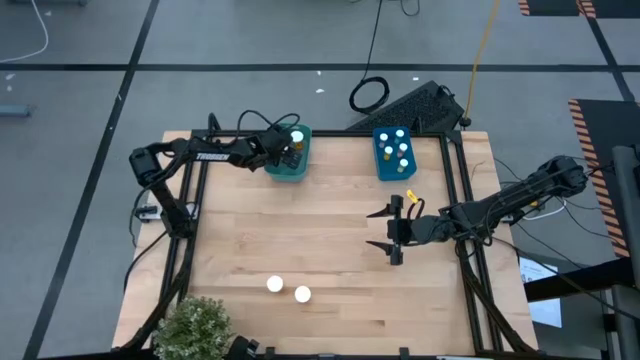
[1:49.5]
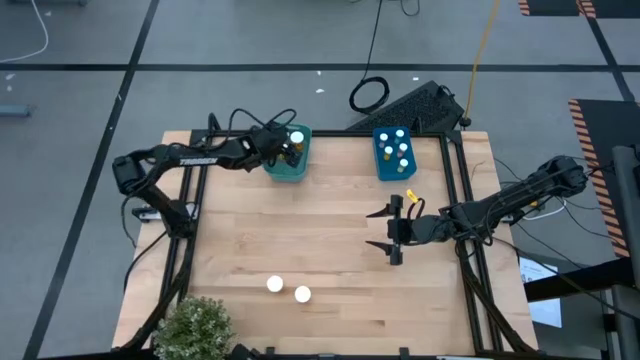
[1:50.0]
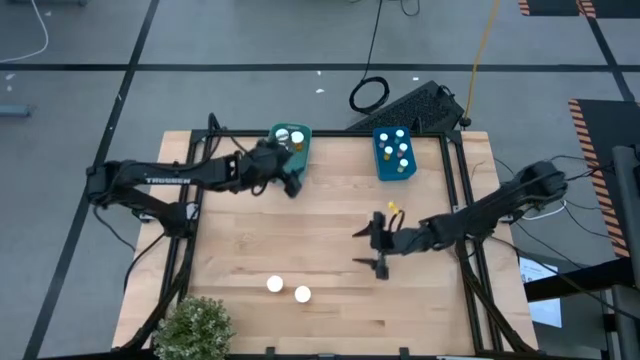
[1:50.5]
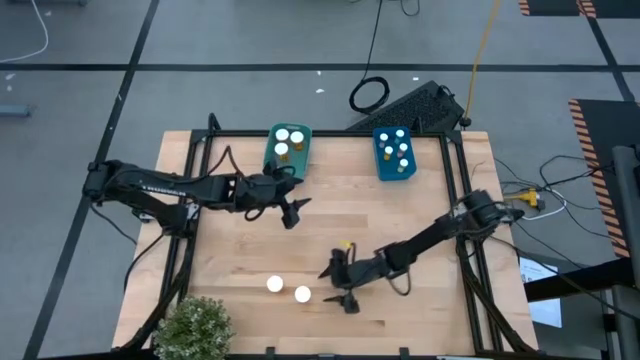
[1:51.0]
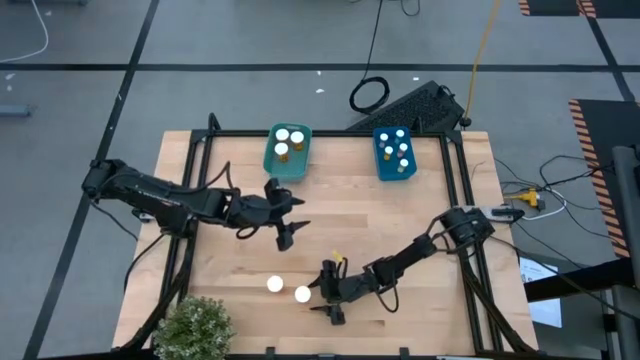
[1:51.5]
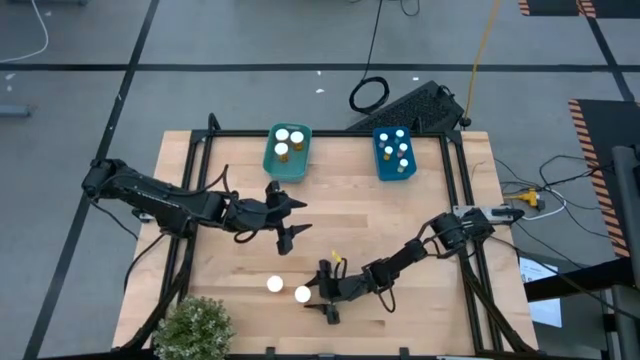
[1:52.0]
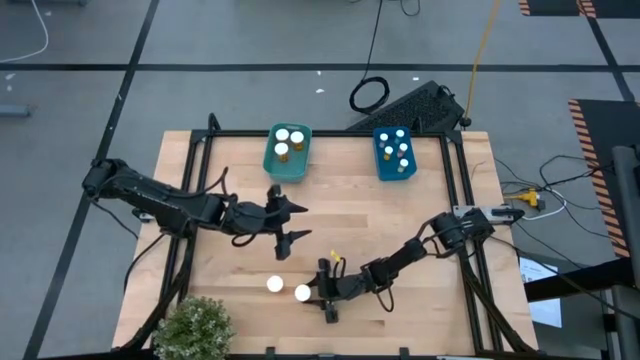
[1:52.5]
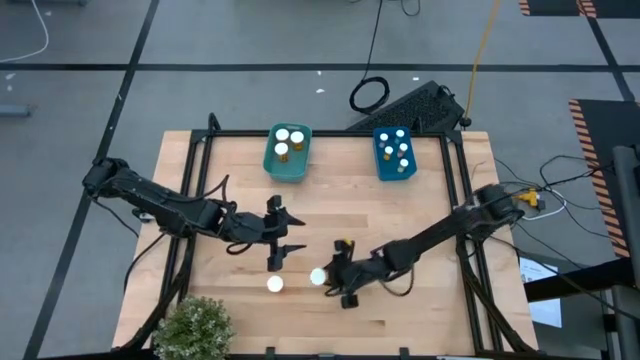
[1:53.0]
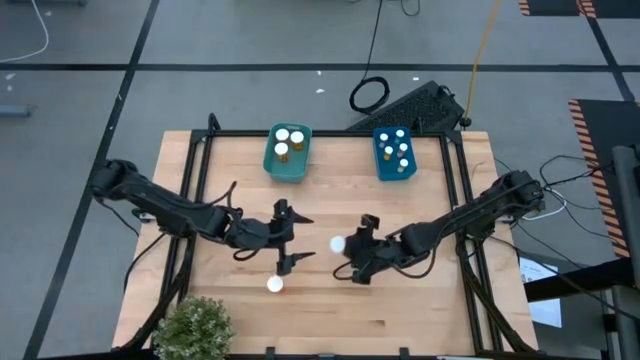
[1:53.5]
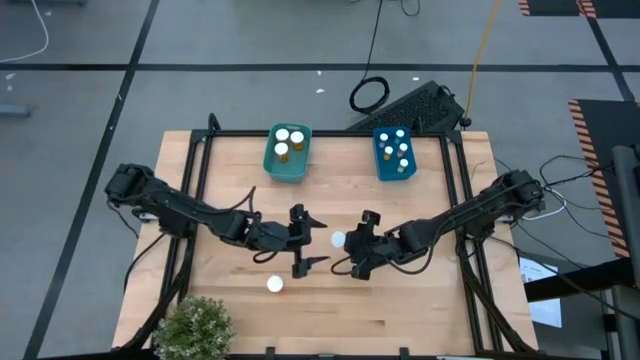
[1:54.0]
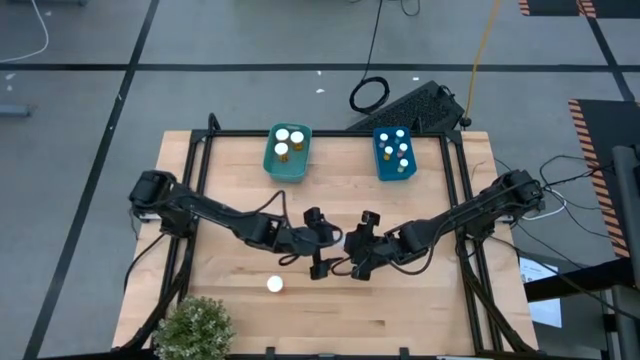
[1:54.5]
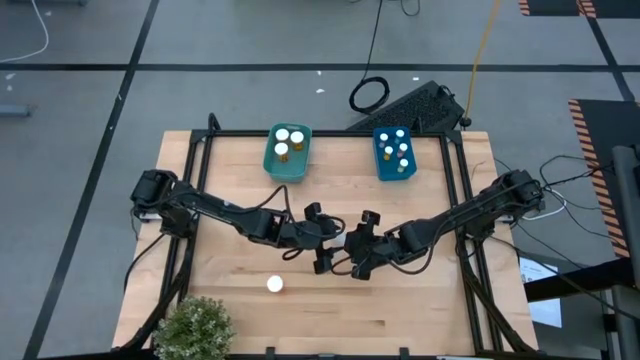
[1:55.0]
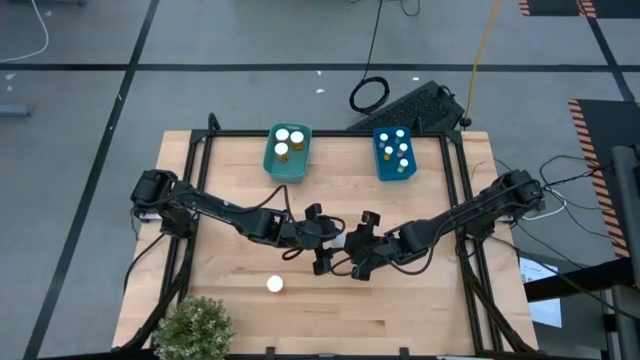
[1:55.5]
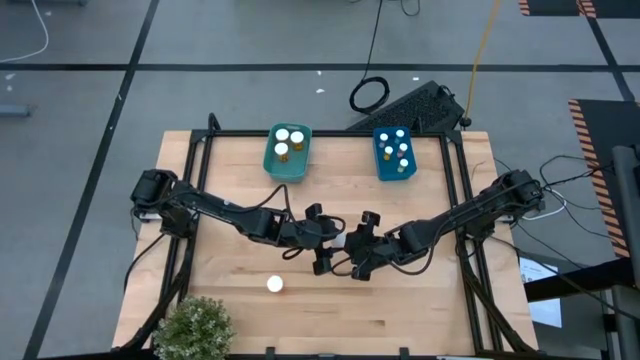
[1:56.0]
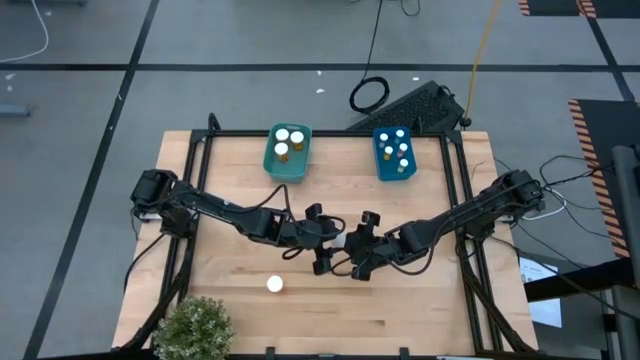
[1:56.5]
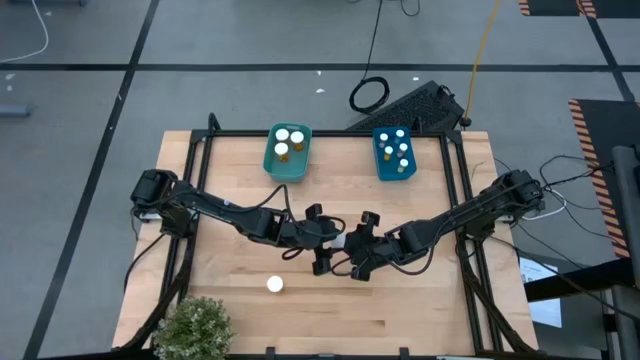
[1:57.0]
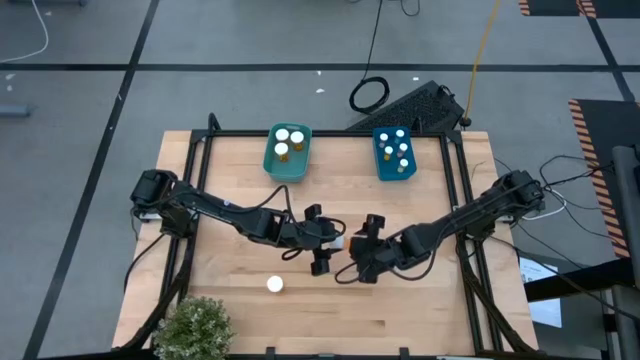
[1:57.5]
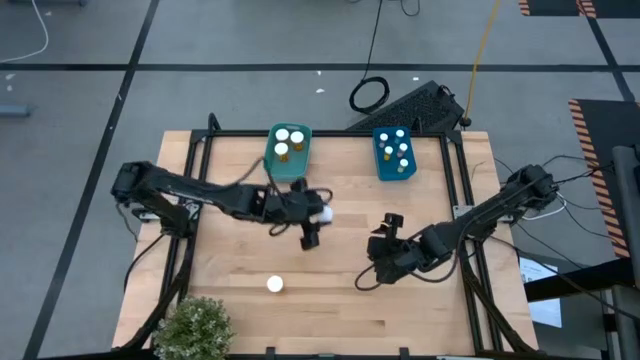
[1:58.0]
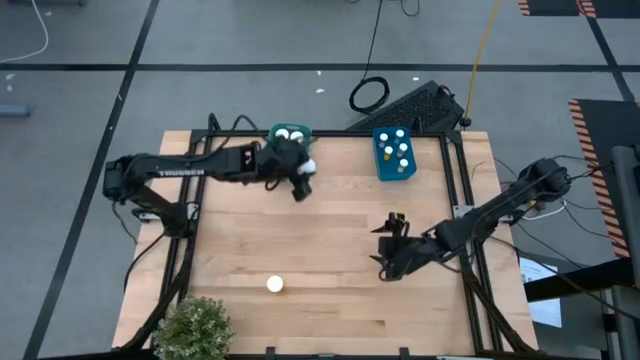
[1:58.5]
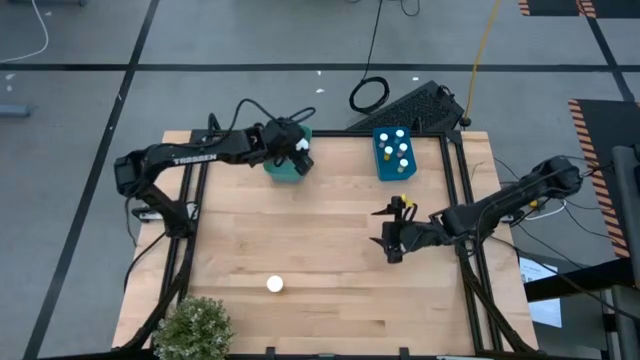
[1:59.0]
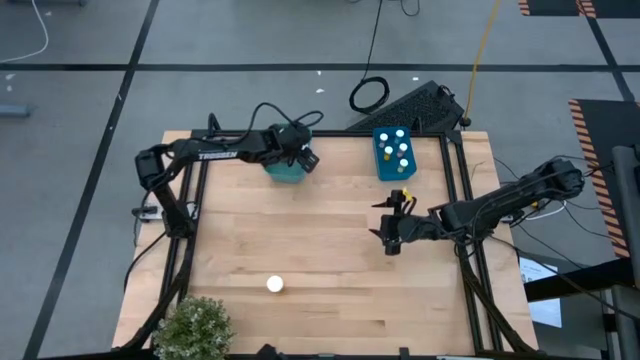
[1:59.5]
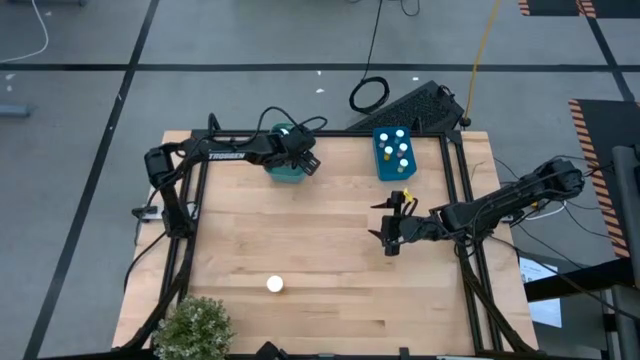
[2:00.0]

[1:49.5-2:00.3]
Task: Pick and place medicine bottles into bin by pill shape (circle, oval)
Put the left big orange pill bottle into the green bin

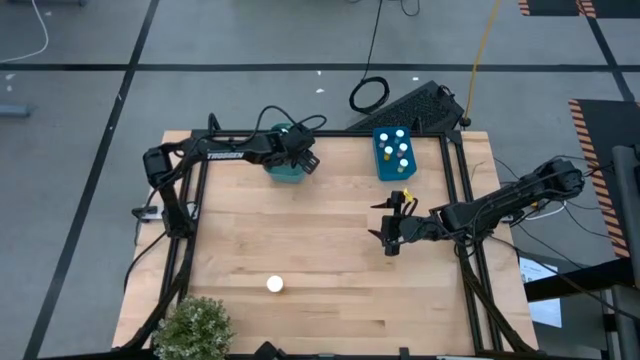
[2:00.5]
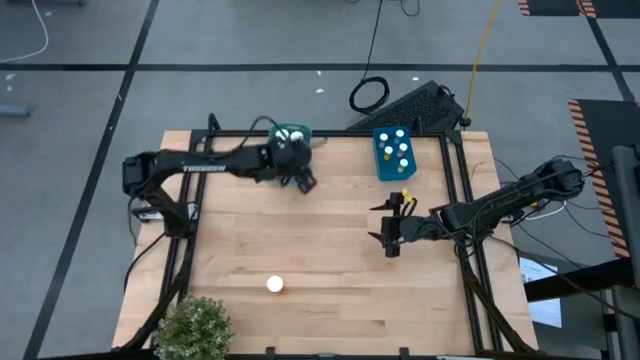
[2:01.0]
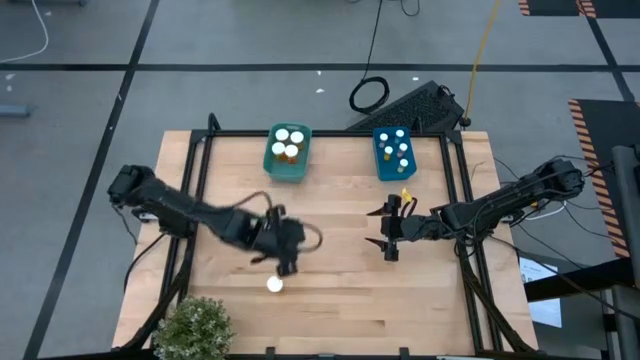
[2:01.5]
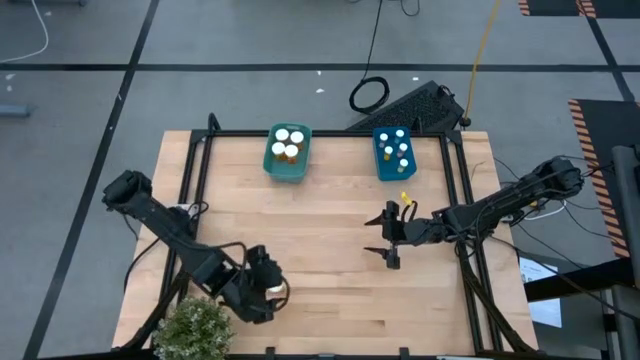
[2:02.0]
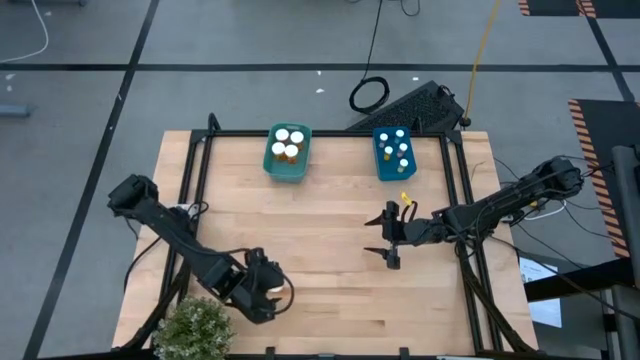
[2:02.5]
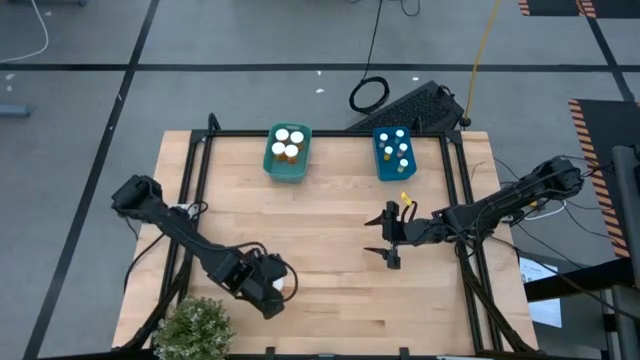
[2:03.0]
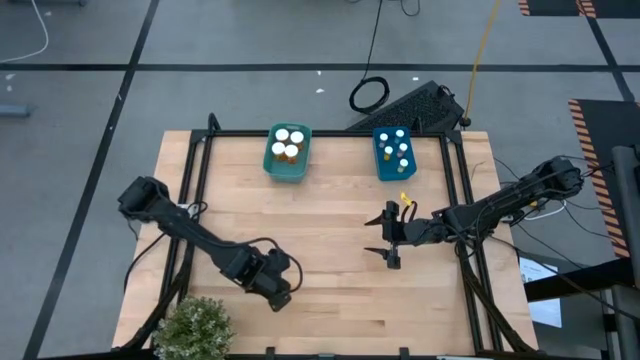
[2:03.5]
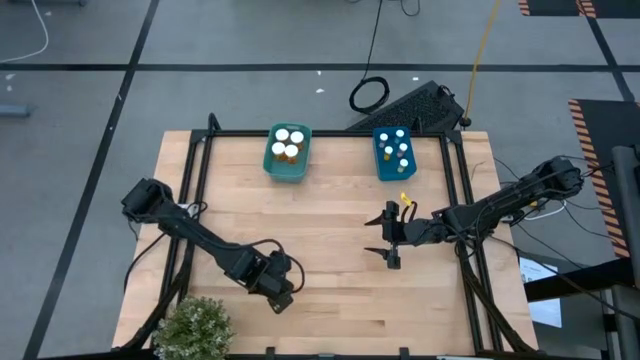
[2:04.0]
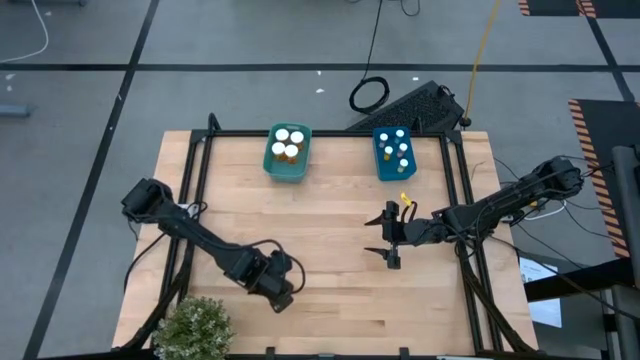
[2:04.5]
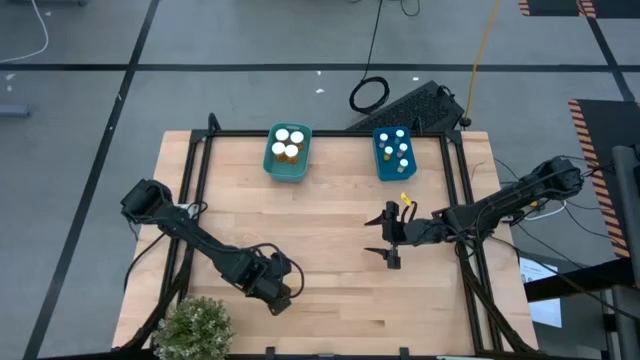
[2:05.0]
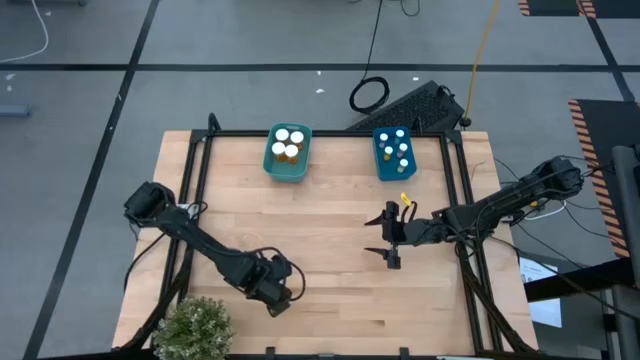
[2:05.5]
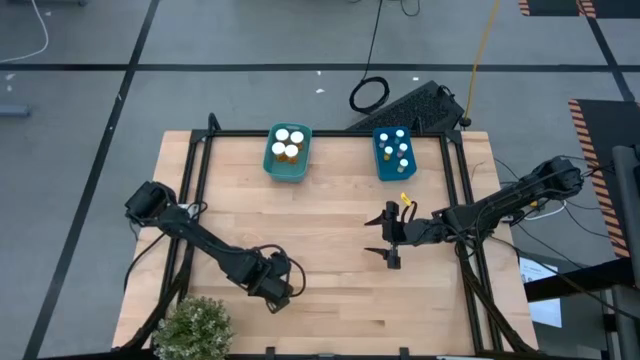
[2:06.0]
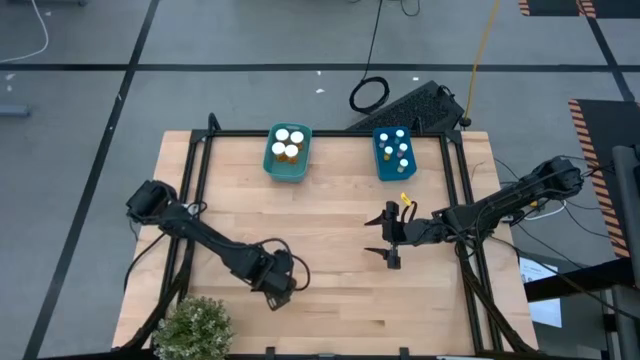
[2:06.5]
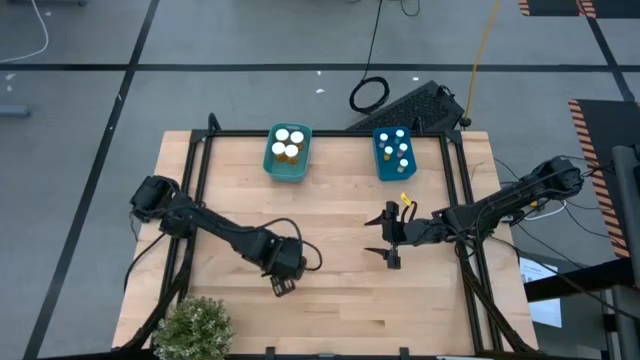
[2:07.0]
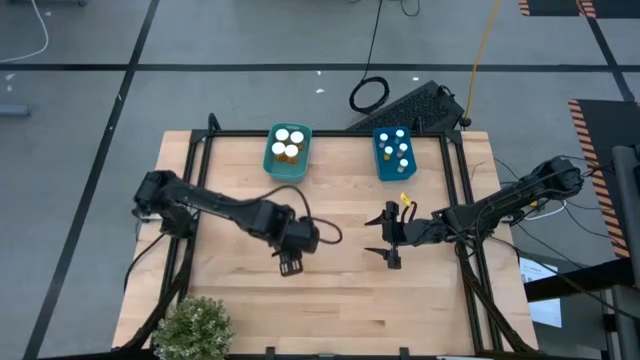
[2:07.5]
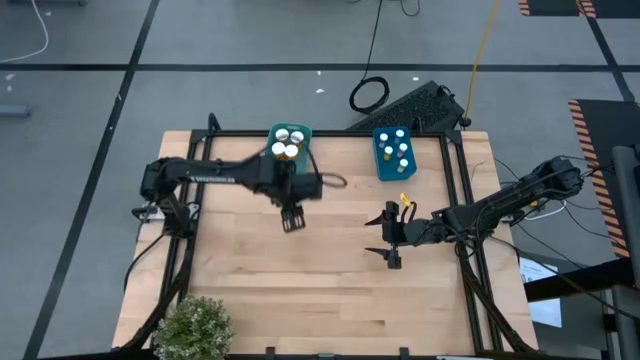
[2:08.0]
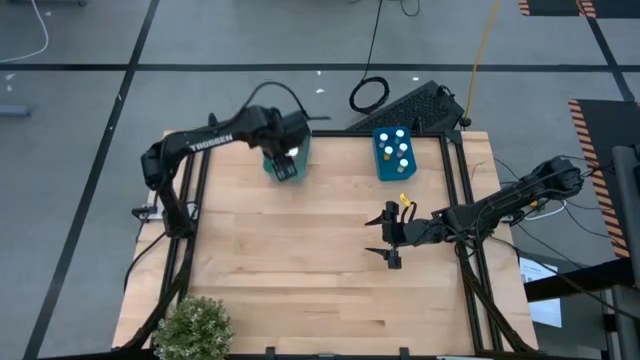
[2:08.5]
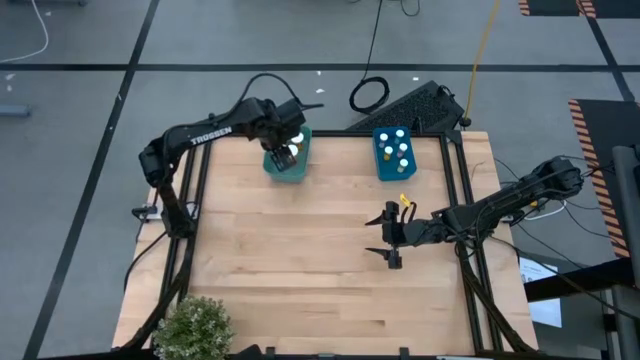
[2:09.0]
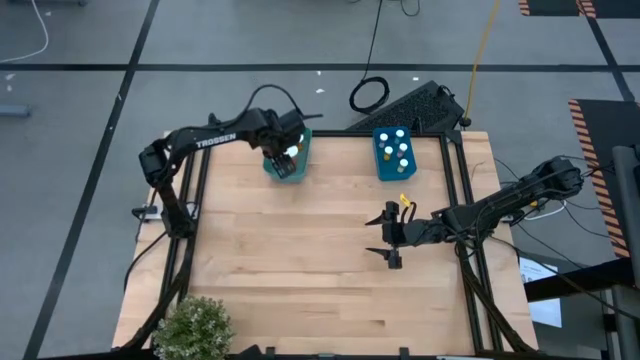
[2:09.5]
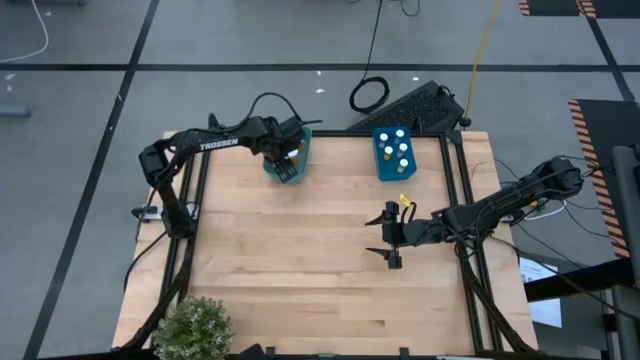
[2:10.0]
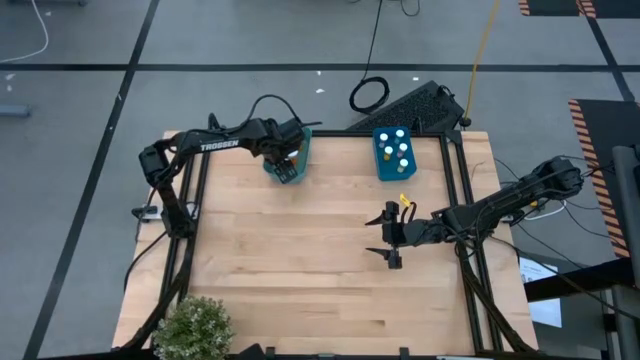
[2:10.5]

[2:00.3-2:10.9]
Put the big orange pill bottle into the green bin
